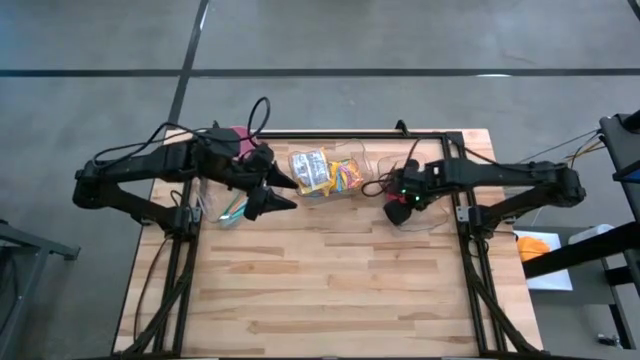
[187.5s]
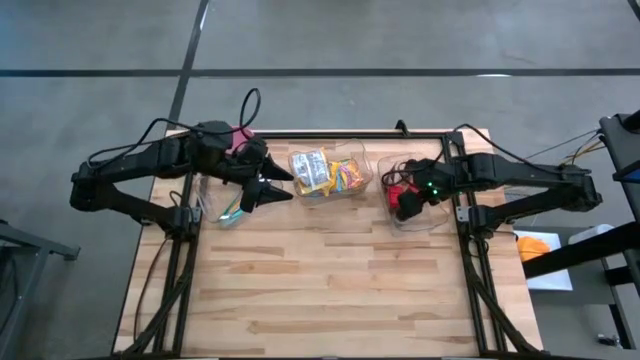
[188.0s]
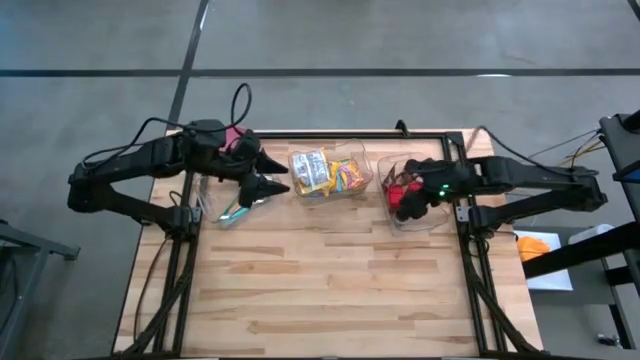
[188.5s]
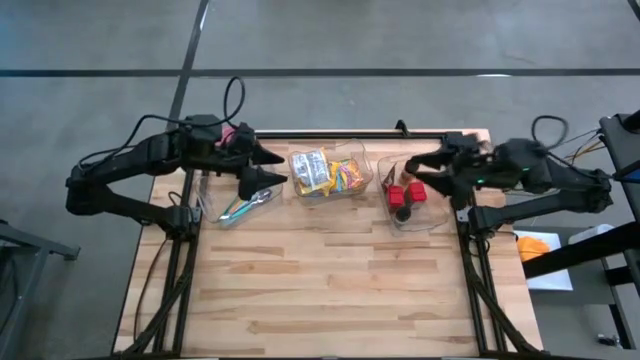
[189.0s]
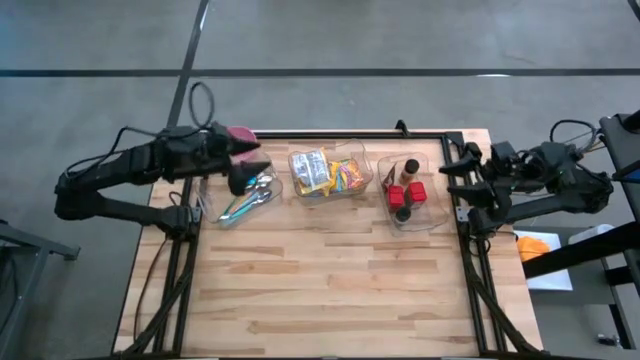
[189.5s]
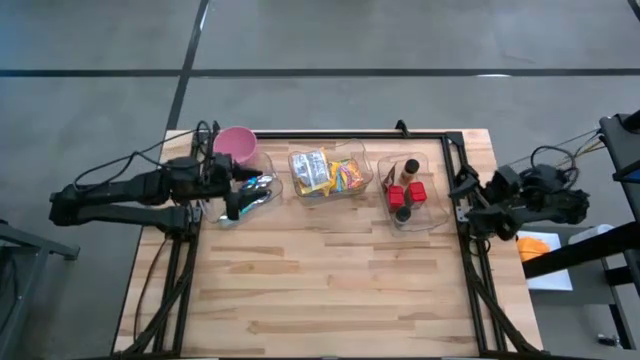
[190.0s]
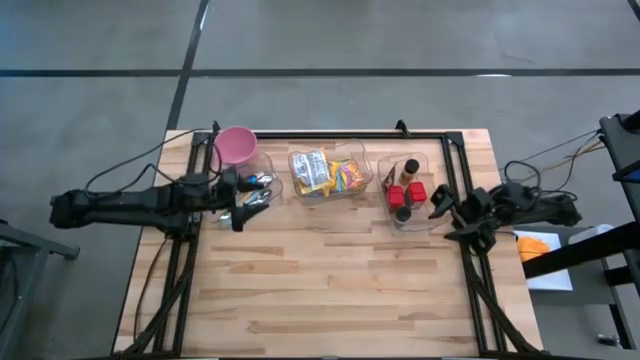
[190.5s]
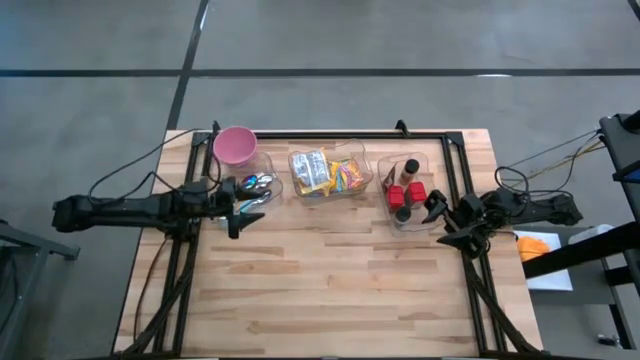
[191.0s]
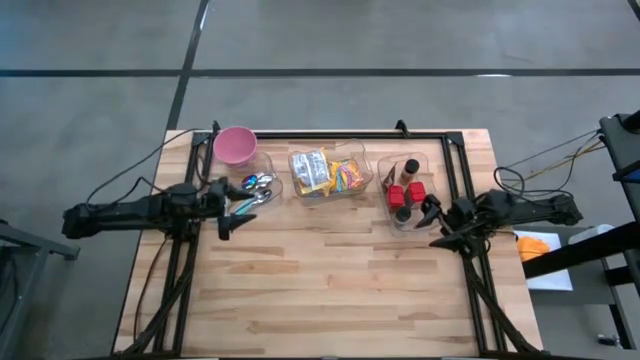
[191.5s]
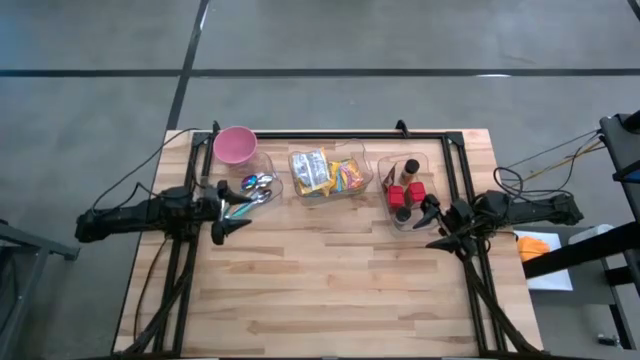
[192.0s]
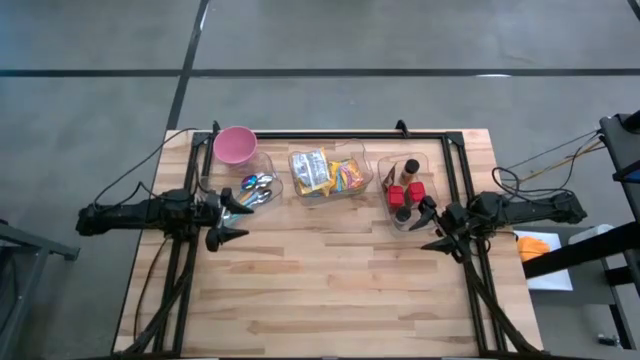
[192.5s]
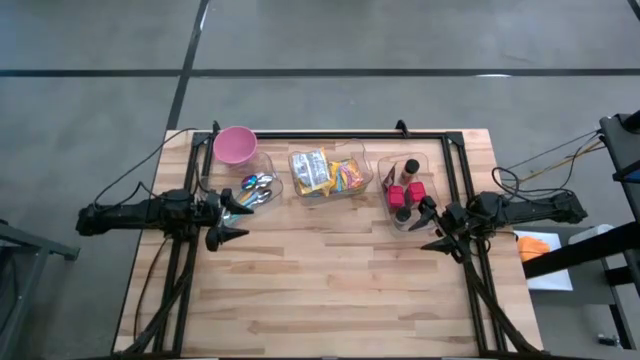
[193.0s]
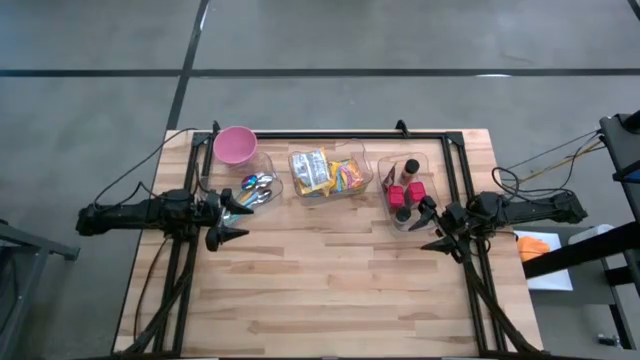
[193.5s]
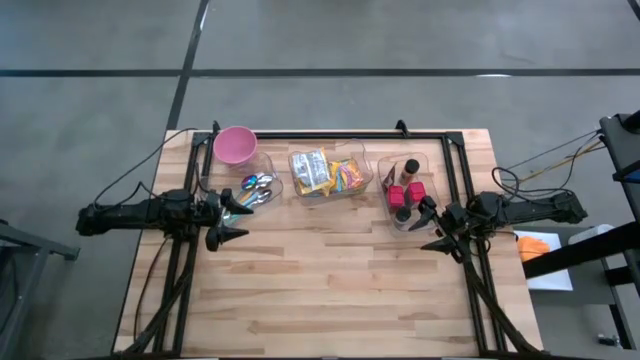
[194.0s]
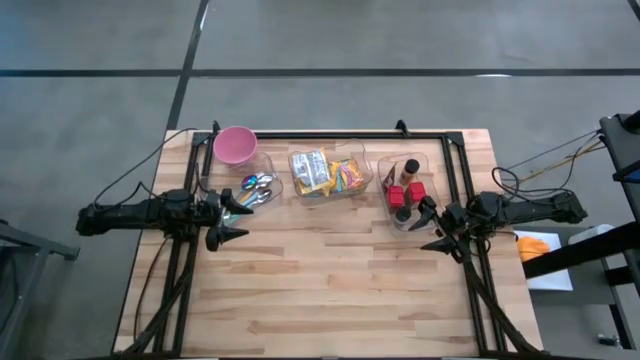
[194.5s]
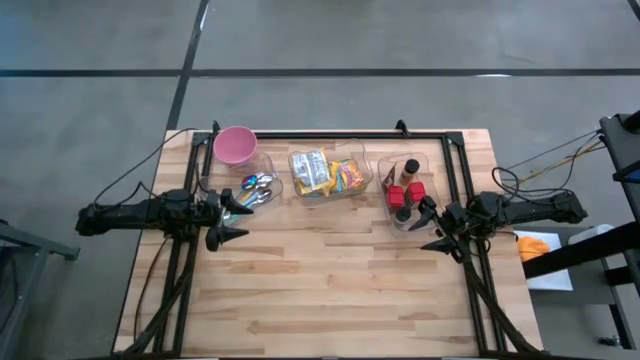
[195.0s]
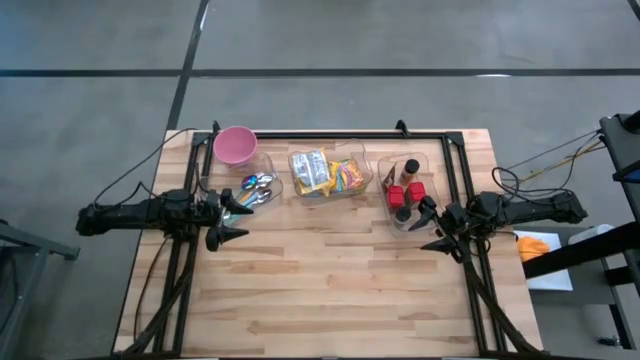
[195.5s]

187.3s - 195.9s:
Return to Home Position

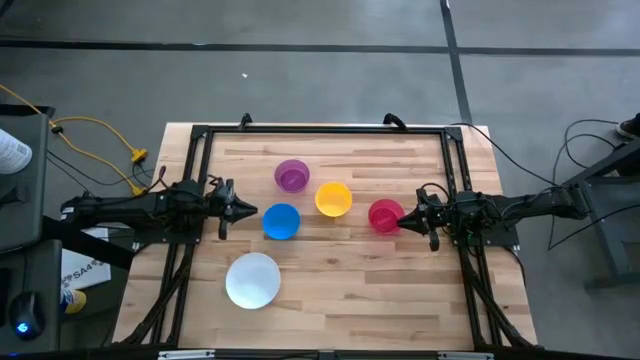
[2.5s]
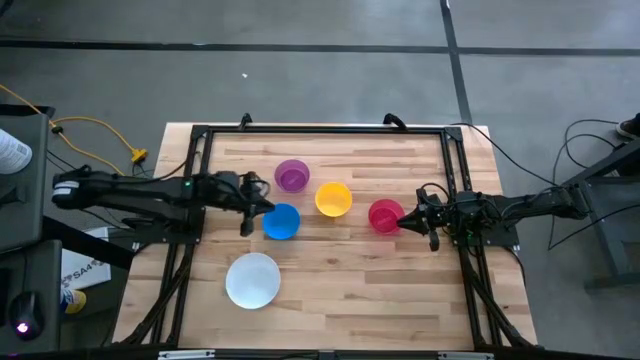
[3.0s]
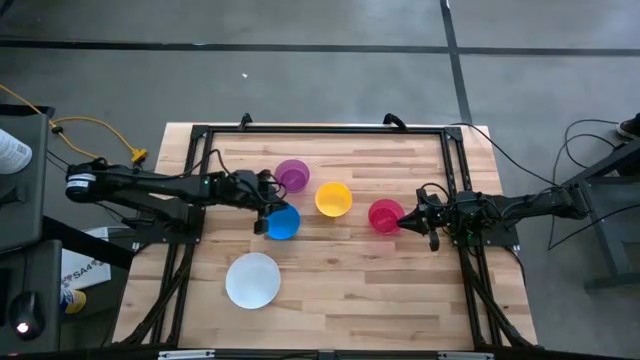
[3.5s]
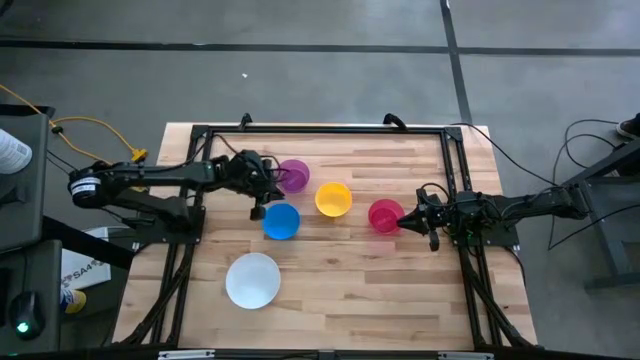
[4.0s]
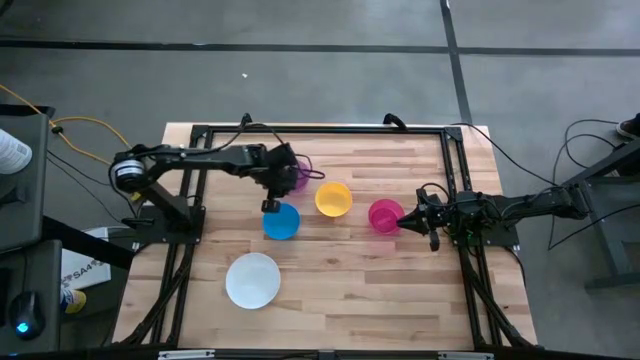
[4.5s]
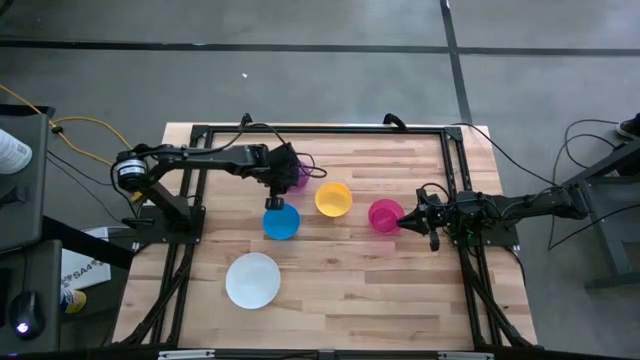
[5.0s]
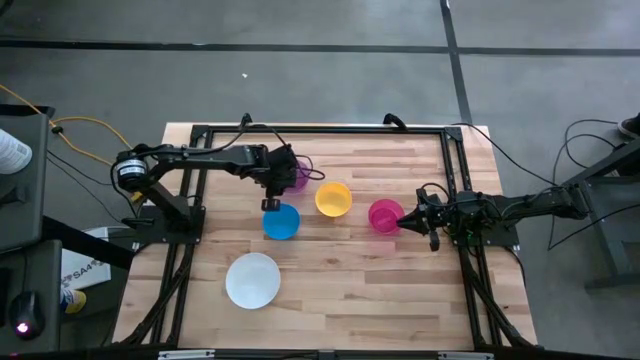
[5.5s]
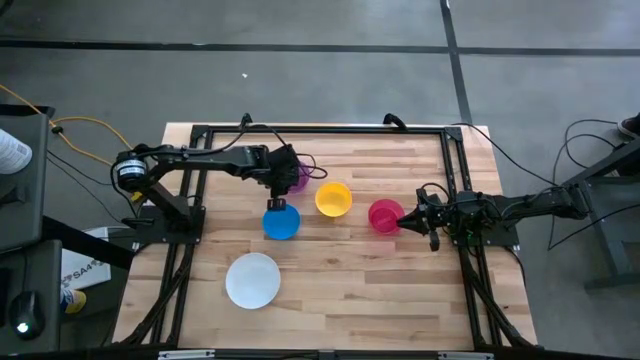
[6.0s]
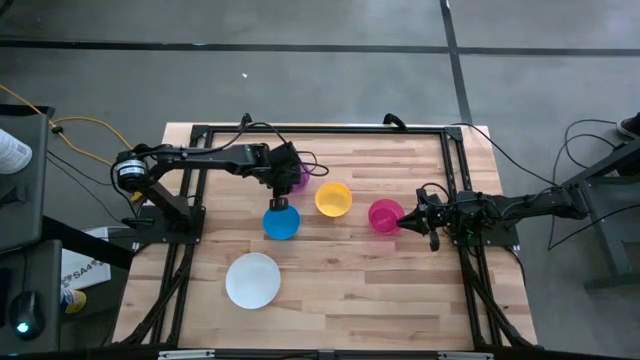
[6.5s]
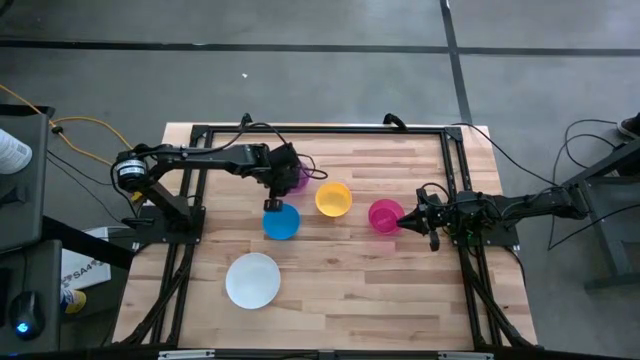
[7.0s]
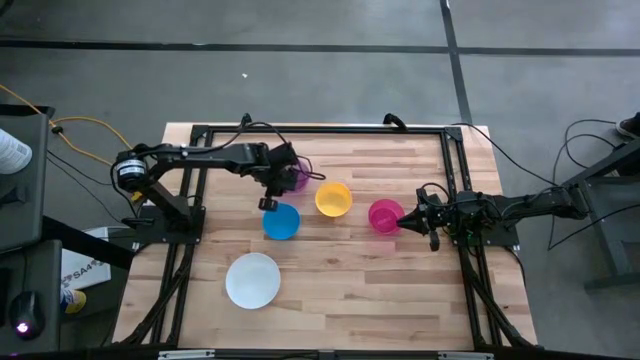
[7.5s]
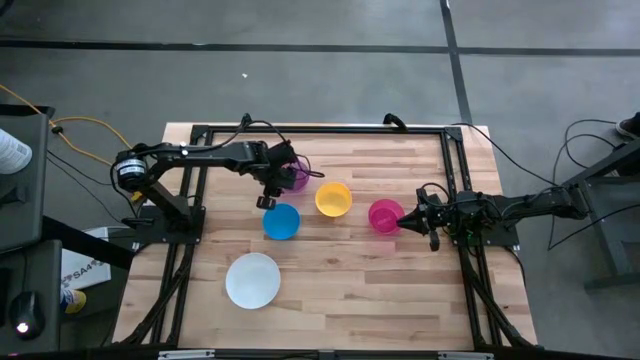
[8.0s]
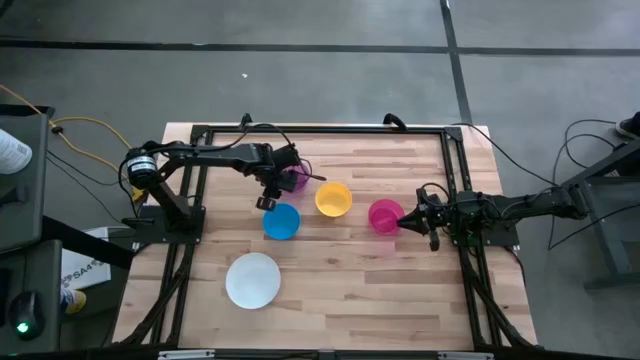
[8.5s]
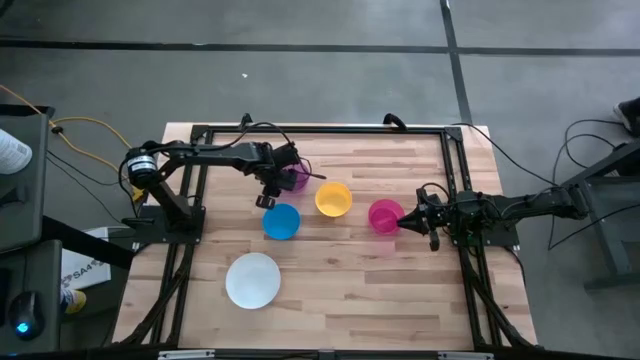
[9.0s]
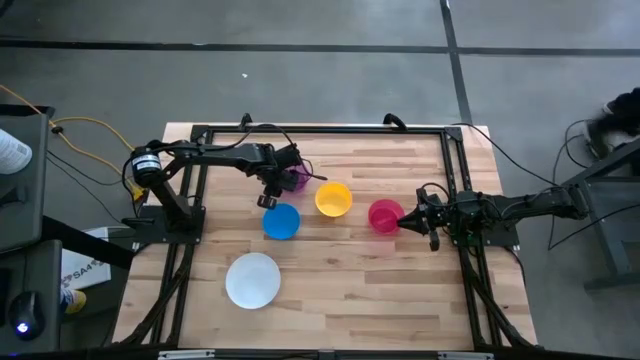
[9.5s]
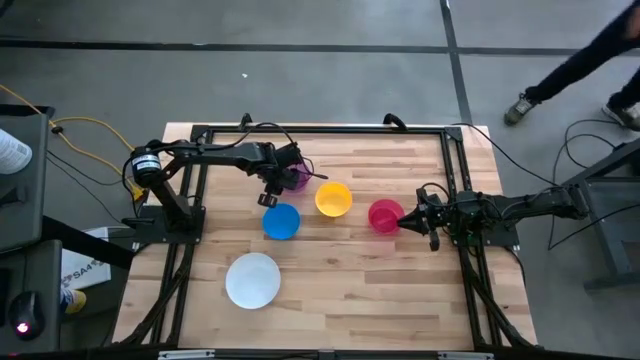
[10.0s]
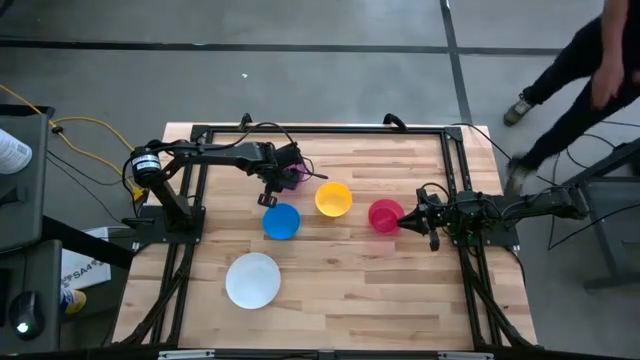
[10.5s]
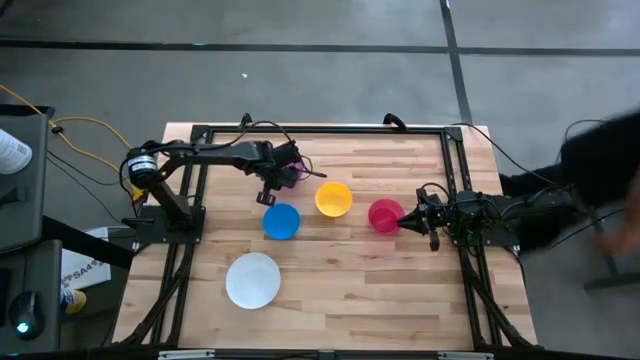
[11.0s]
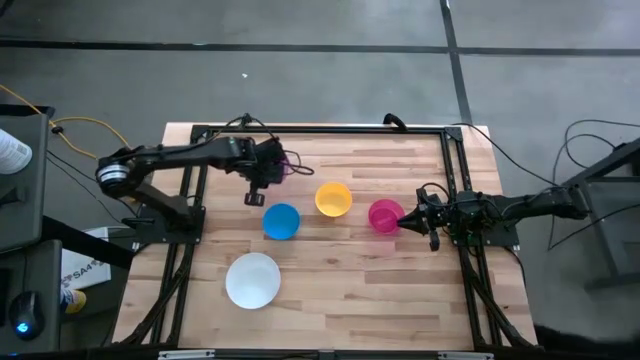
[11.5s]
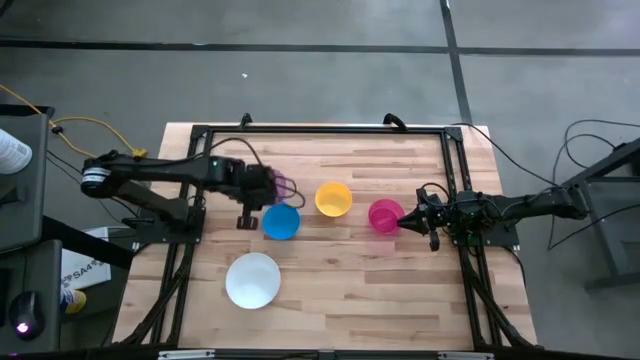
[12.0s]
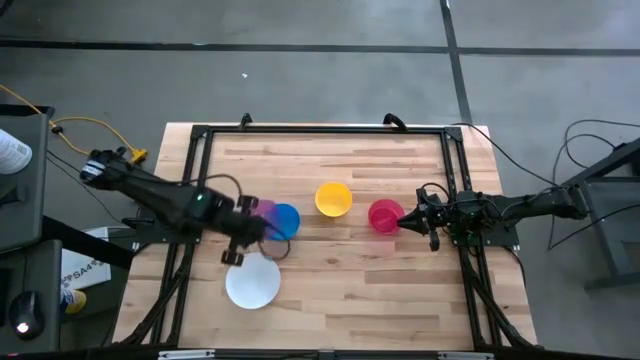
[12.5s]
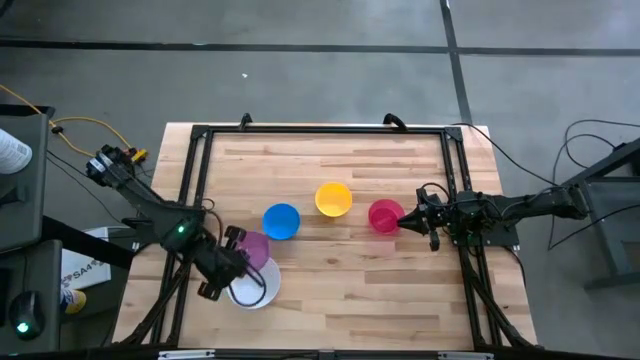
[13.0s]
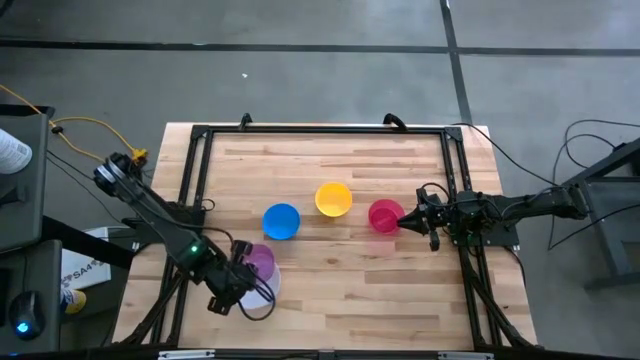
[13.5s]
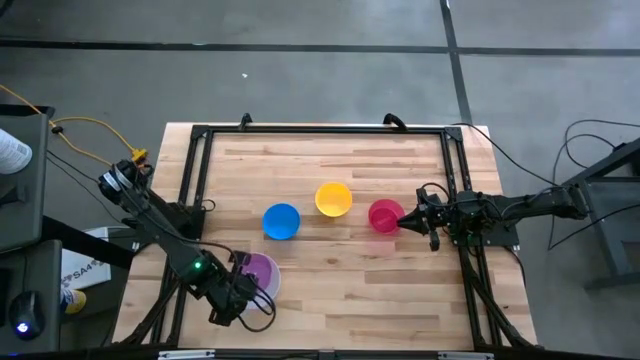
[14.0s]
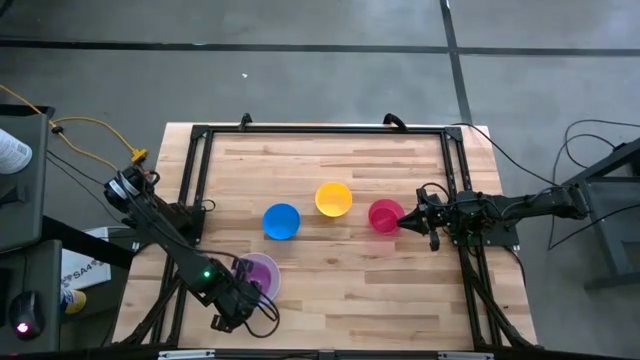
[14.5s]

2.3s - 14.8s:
Stack the purple bowl on the white bowl
